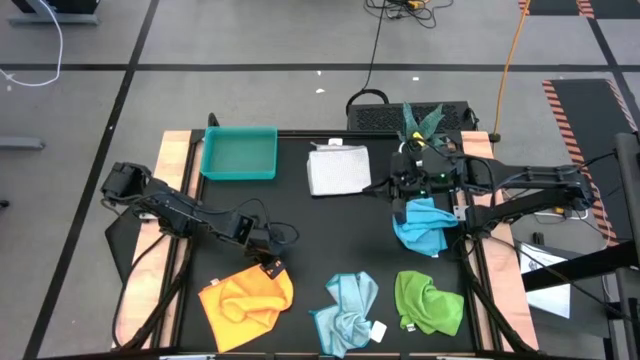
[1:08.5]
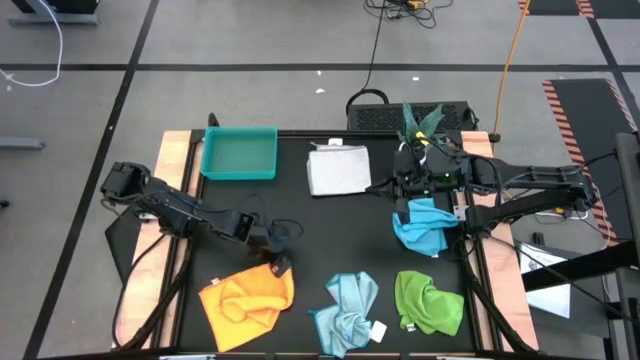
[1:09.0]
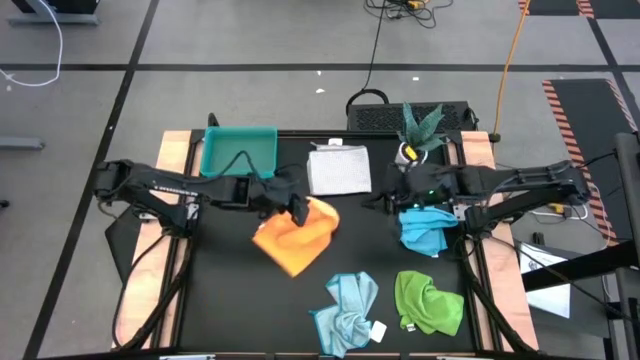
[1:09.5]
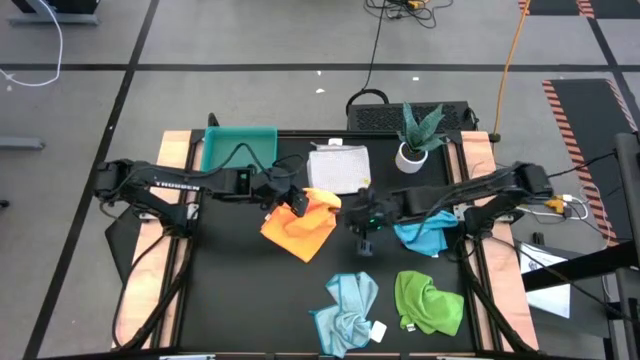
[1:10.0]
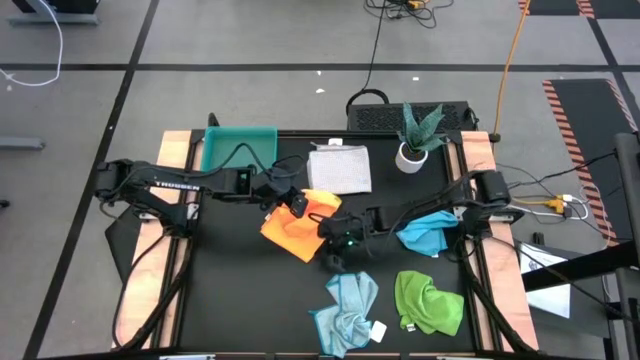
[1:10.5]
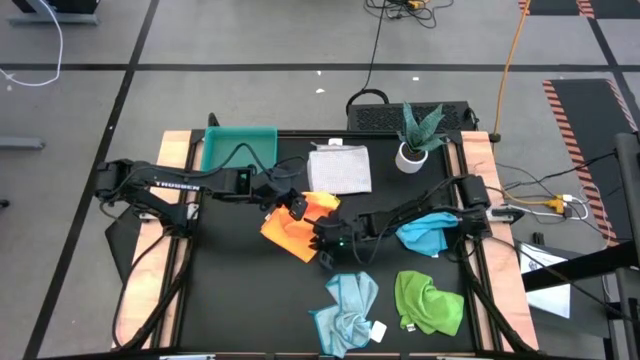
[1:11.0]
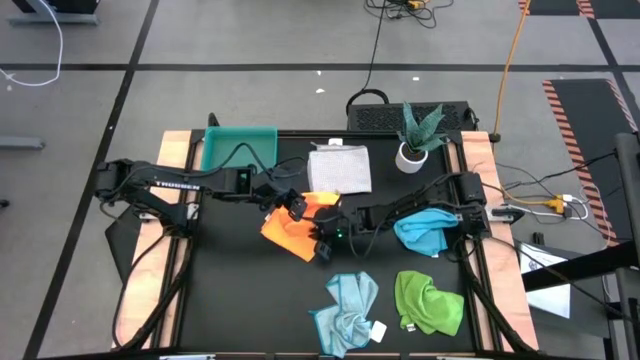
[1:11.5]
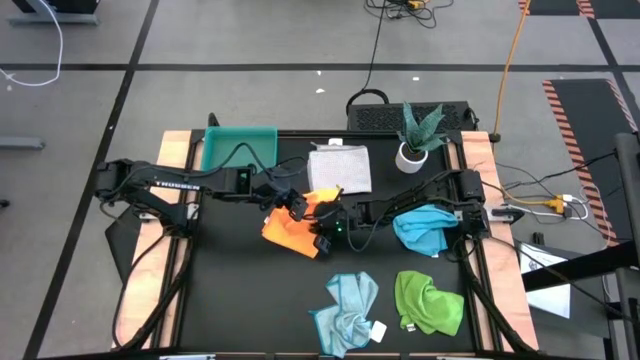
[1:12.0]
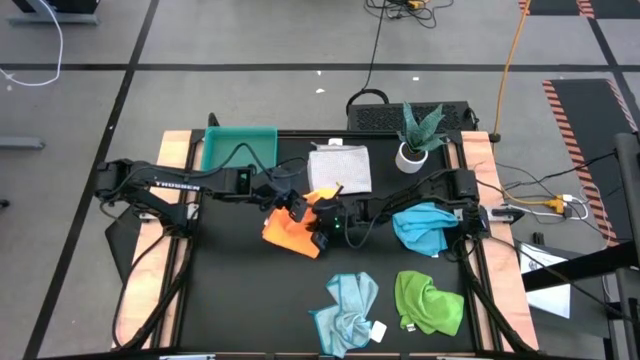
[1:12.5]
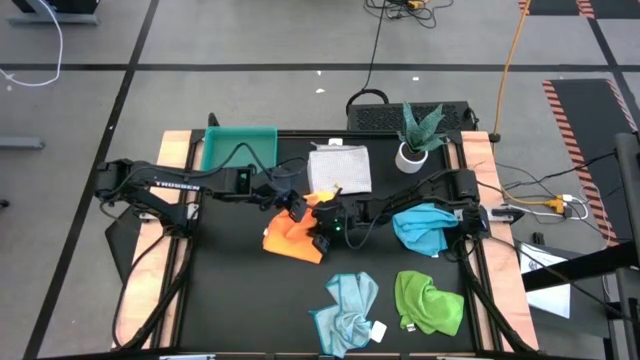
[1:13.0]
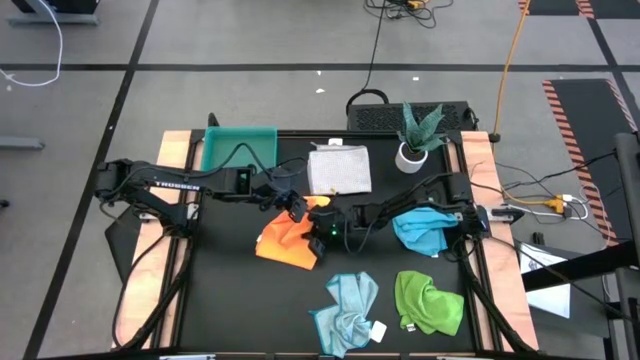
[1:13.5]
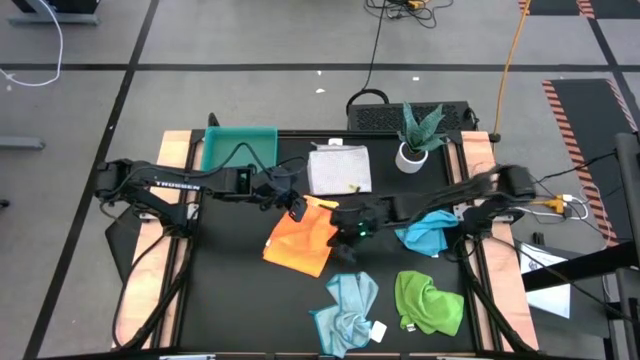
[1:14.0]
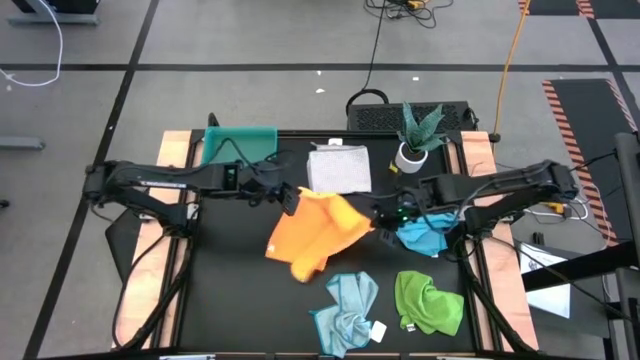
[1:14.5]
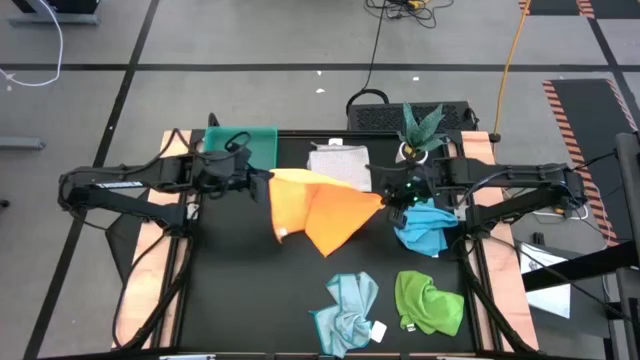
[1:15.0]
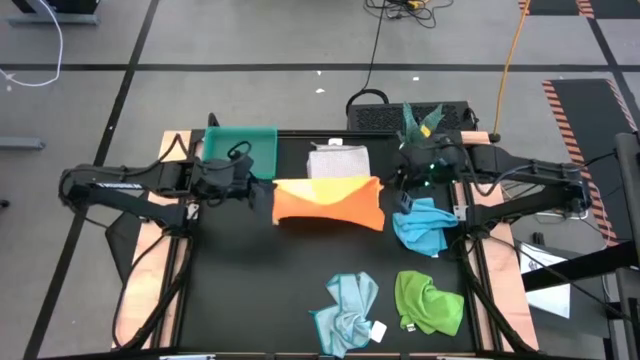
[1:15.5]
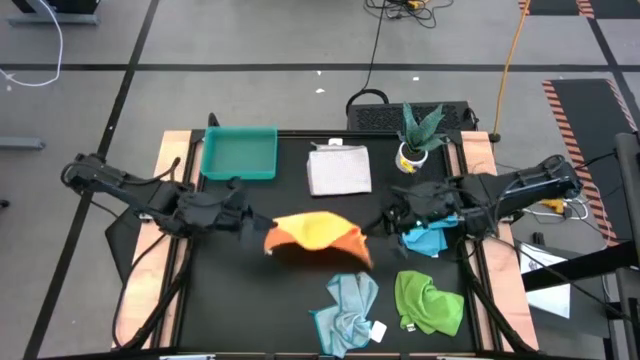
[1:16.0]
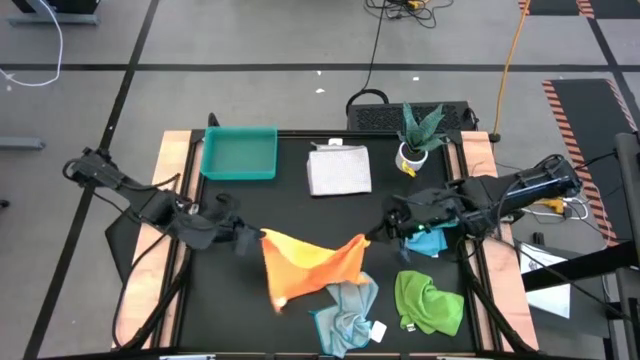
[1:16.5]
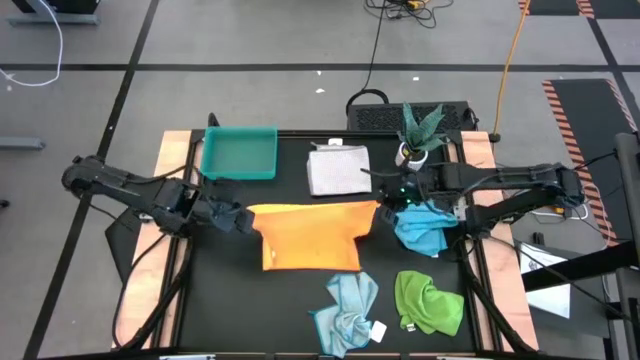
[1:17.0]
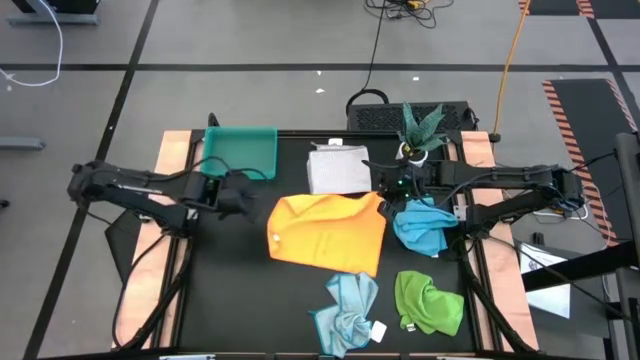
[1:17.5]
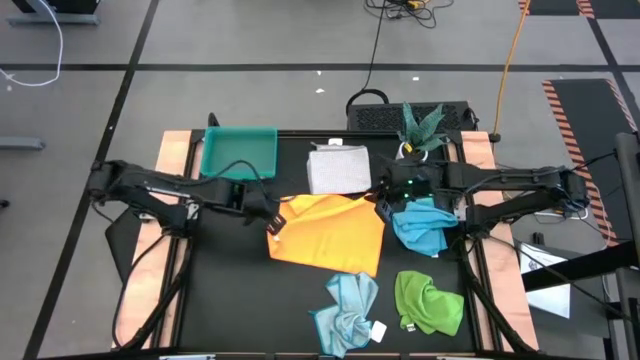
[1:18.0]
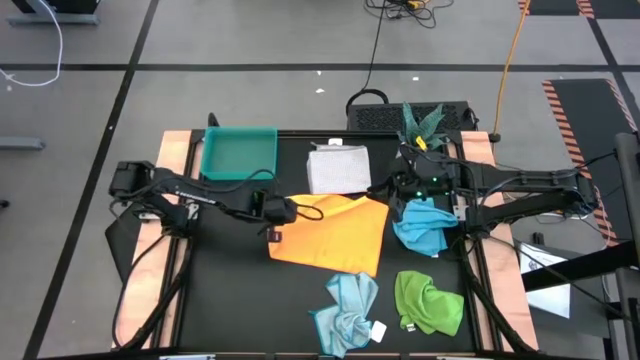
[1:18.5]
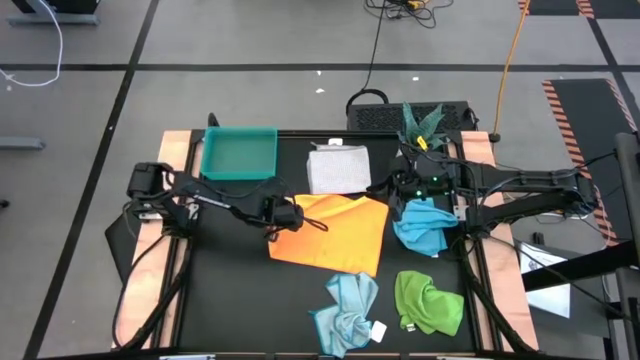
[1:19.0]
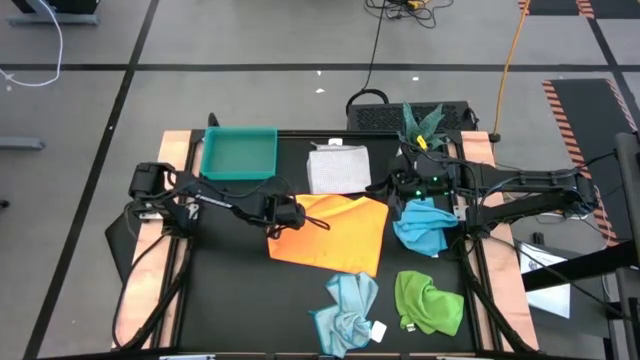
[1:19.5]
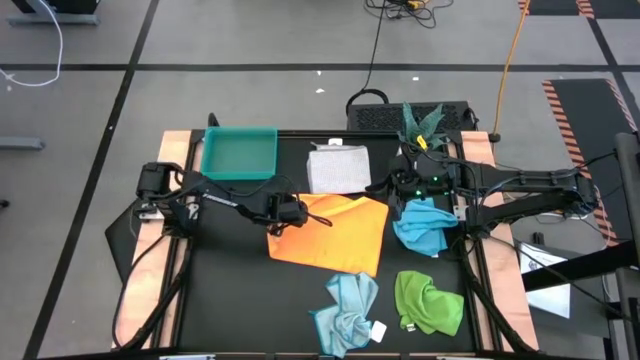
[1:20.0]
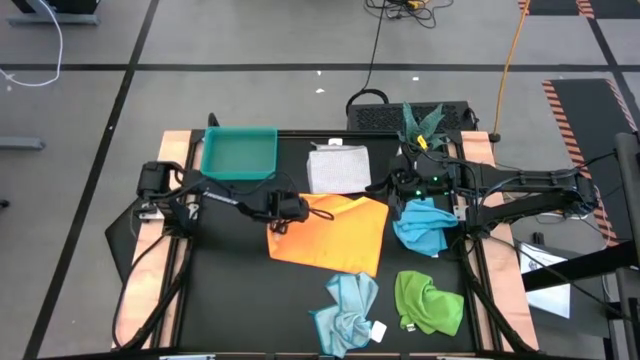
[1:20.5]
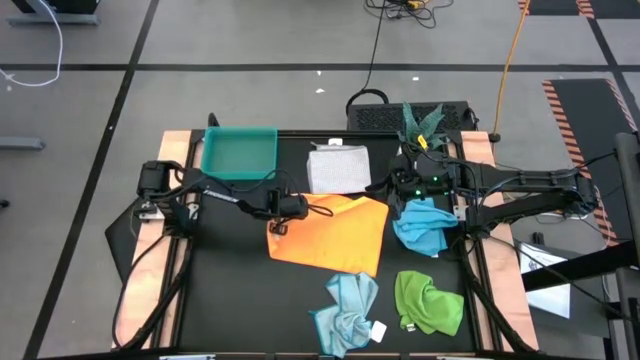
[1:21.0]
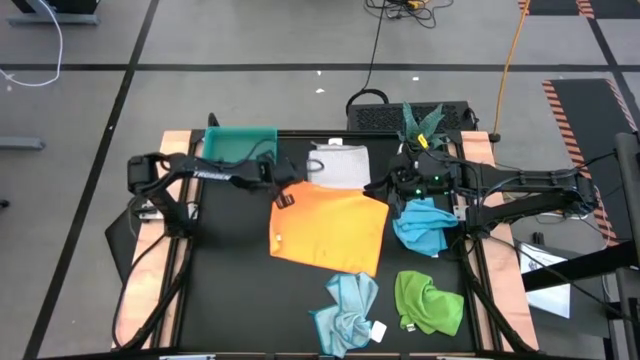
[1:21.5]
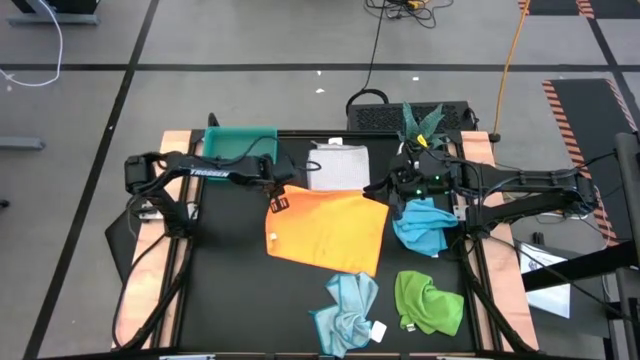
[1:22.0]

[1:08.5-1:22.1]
Task: Fold microfiber towels
Fold the orange microfiber towel

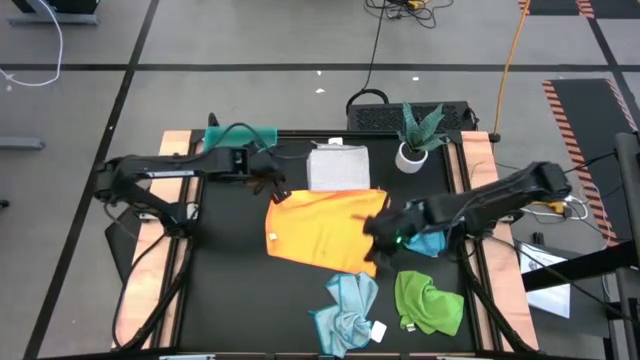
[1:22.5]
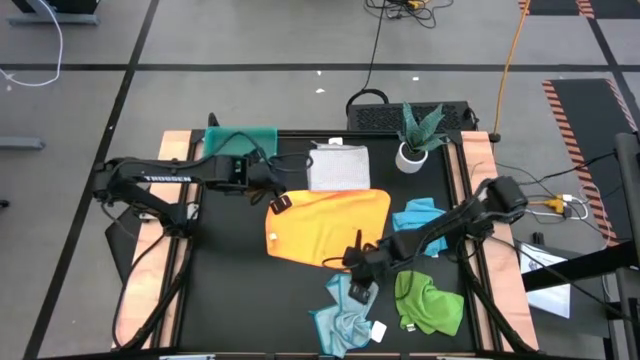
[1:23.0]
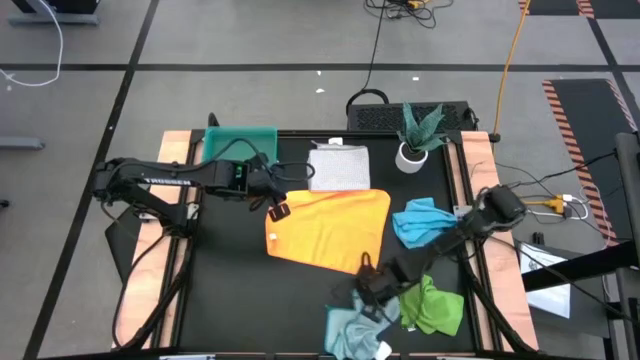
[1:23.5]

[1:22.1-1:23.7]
Adjust the light blue microfiber towel

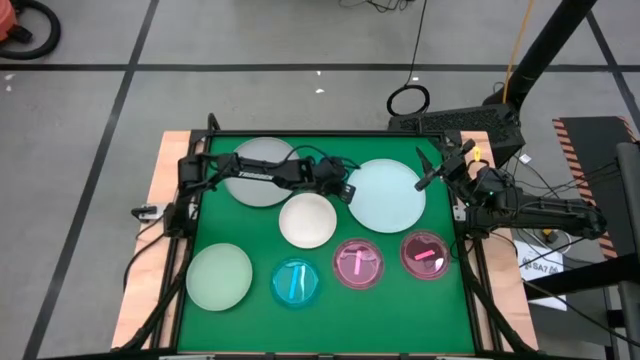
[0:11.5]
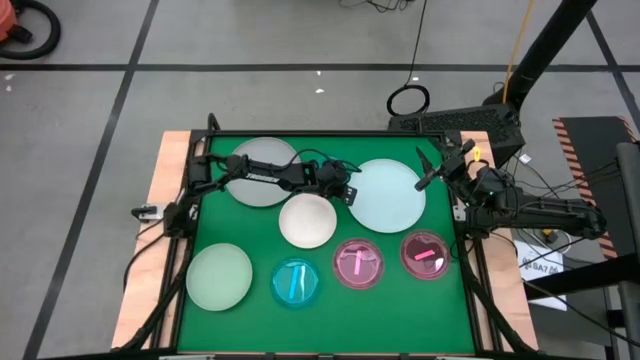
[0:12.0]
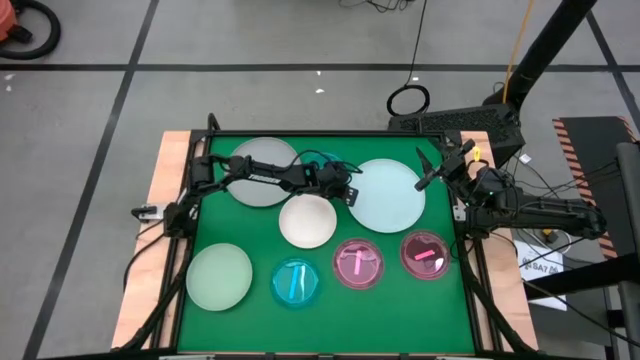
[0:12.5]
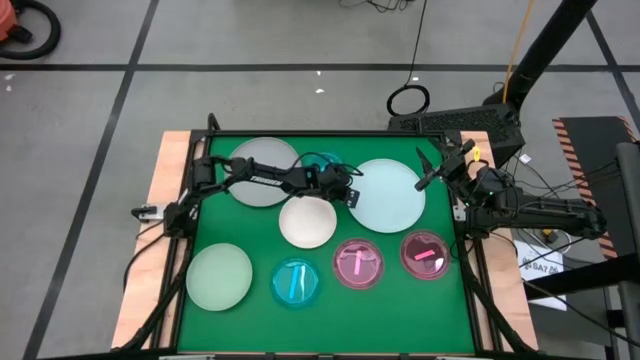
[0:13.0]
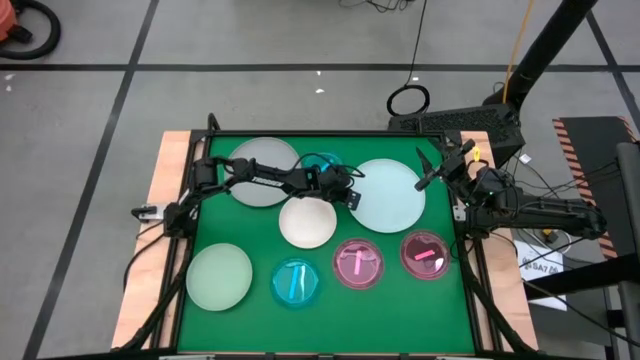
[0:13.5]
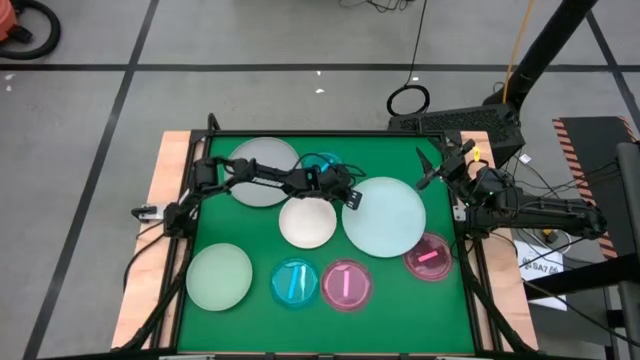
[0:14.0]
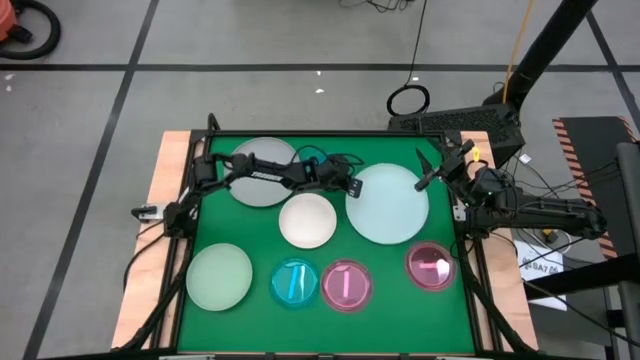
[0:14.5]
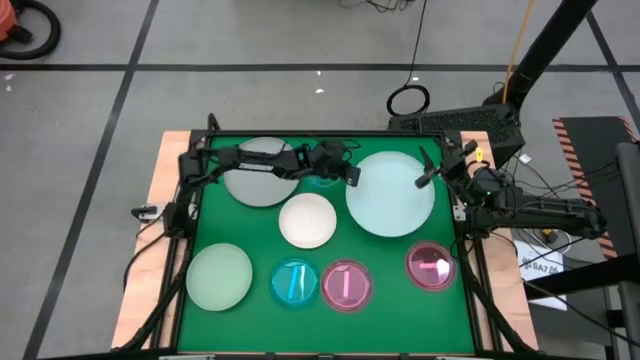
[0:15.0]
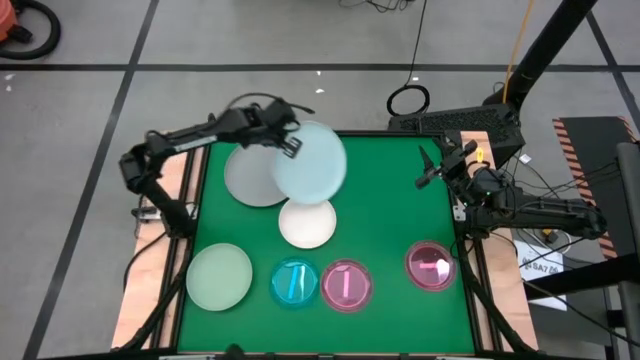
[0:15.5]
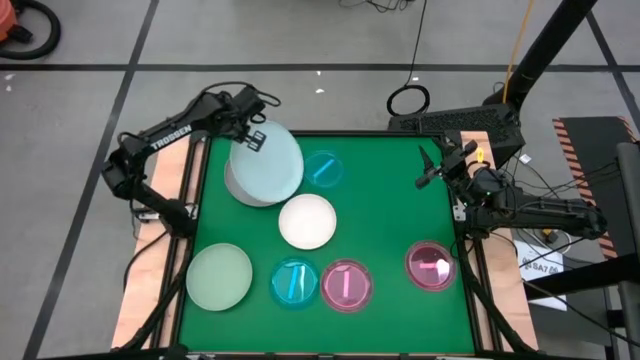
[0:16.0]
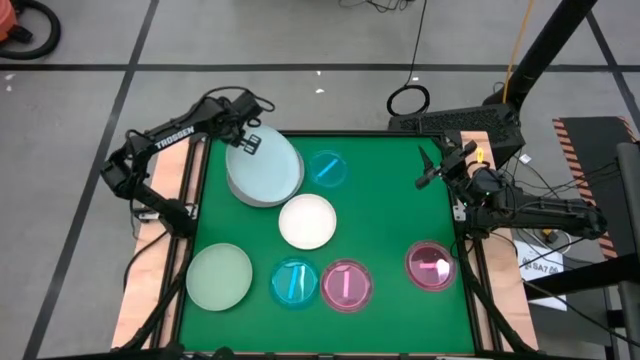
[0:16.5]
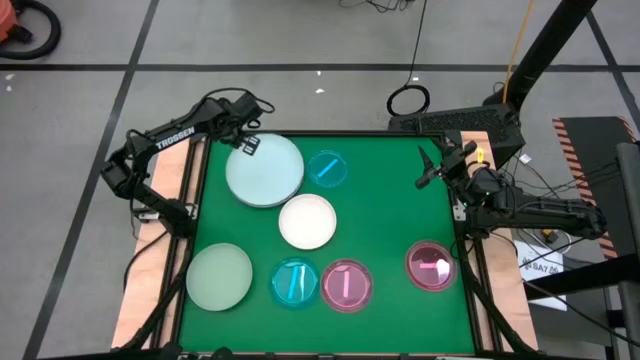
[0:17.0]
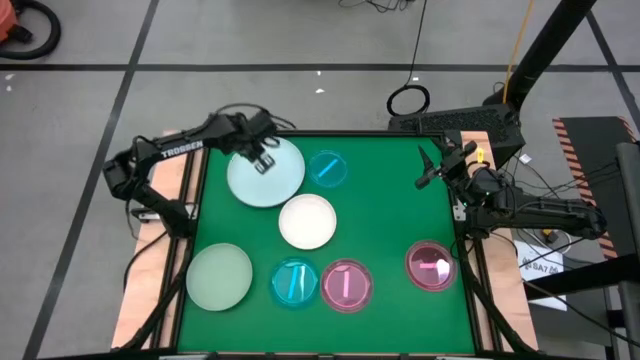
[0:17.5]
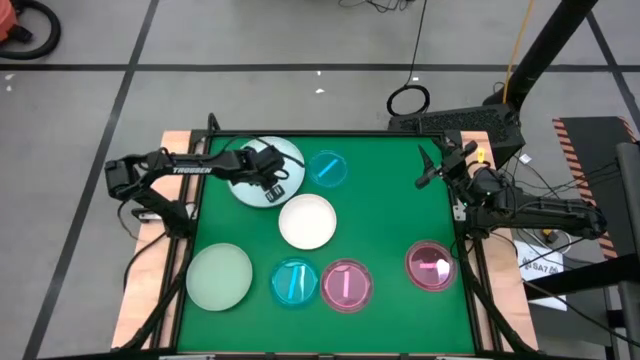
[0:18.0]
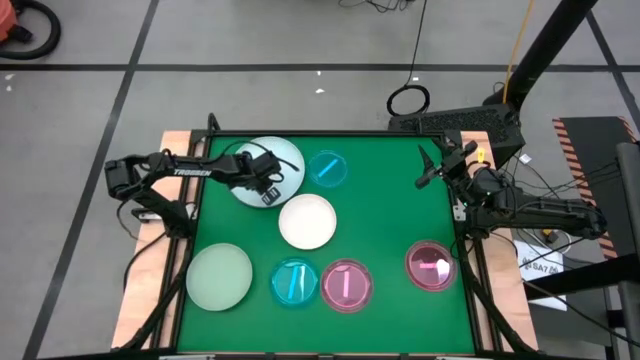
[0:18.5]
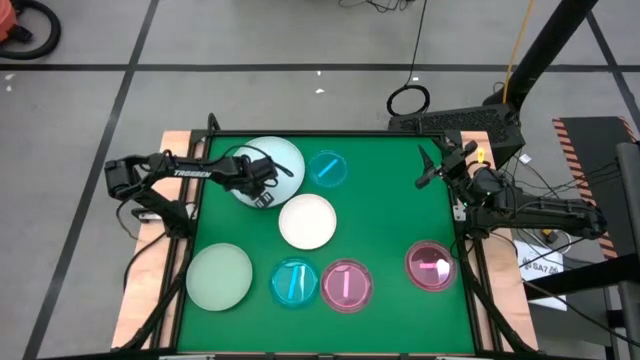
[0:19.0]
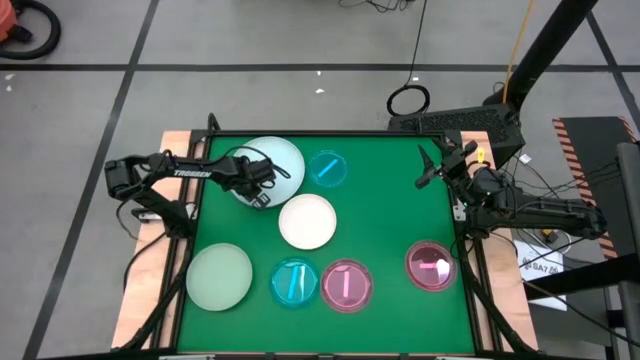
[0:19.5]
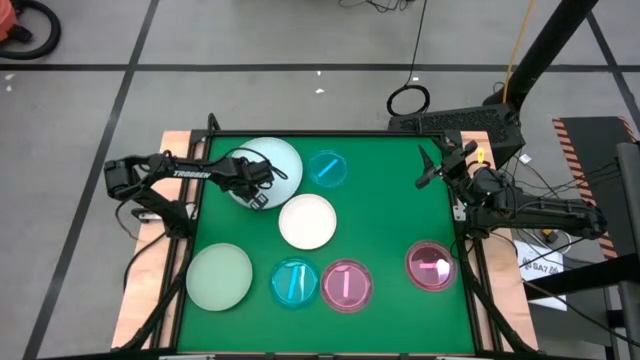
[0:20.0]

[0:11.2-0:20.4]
Task: Stack plastic plates
Stack the light blue plate on top of the gray plate
